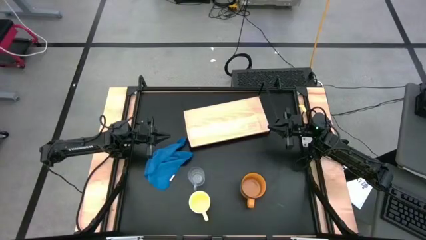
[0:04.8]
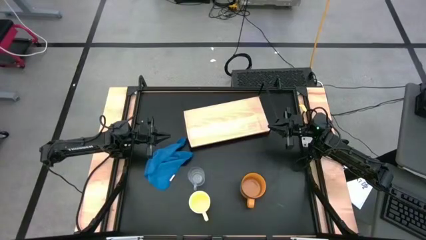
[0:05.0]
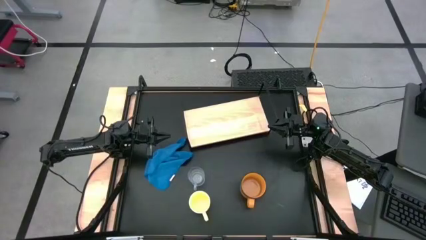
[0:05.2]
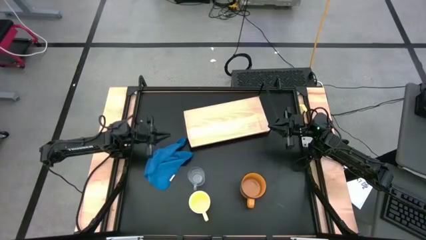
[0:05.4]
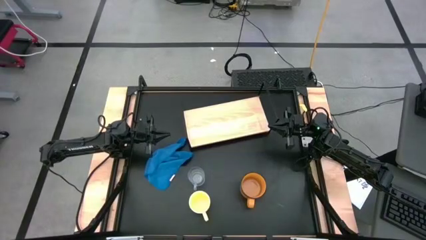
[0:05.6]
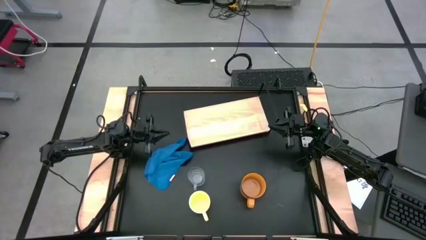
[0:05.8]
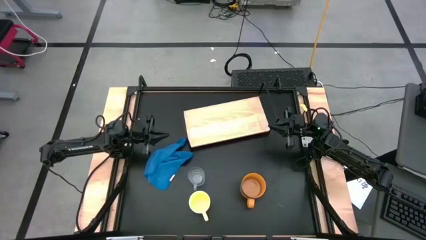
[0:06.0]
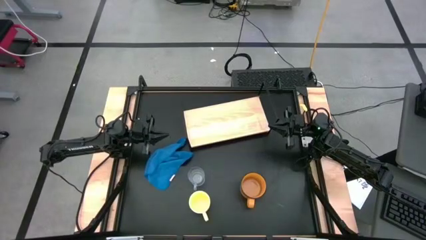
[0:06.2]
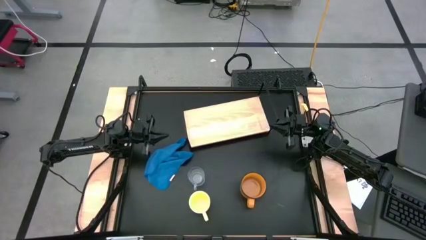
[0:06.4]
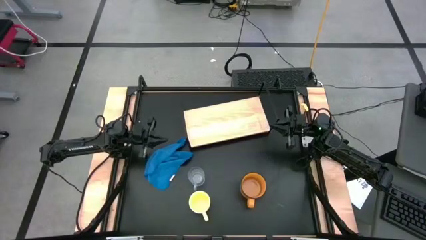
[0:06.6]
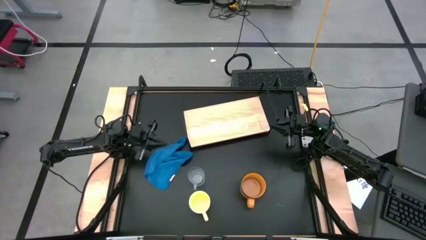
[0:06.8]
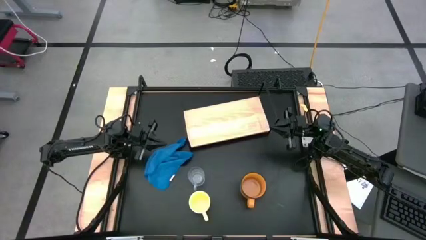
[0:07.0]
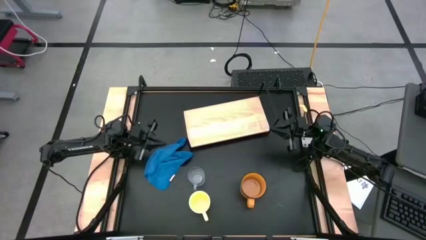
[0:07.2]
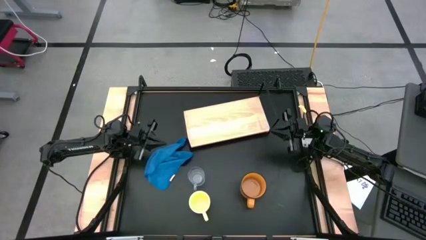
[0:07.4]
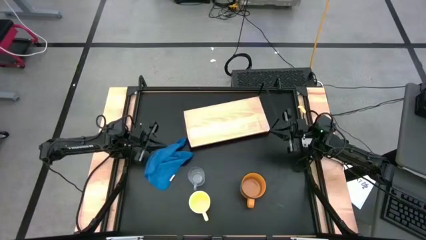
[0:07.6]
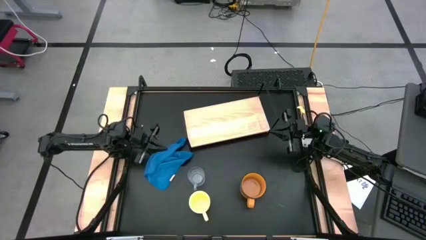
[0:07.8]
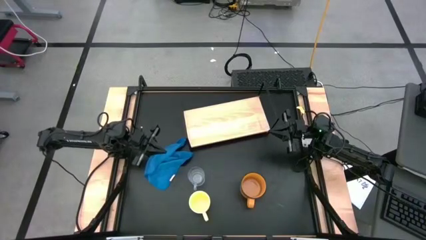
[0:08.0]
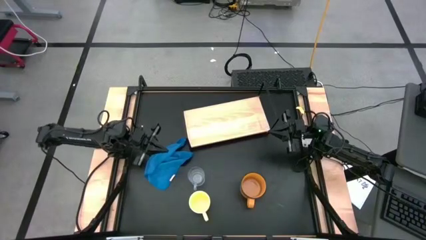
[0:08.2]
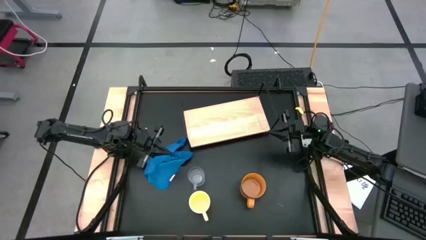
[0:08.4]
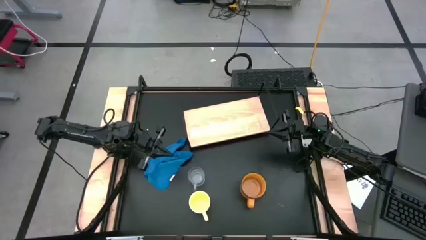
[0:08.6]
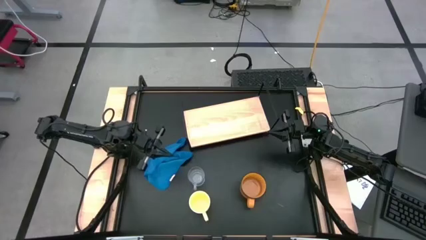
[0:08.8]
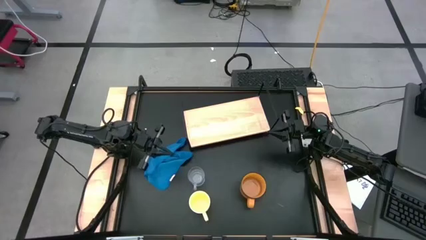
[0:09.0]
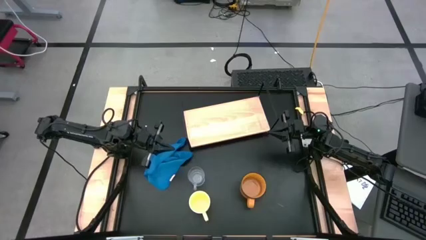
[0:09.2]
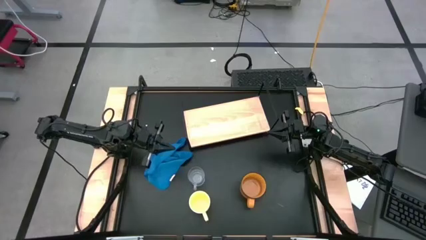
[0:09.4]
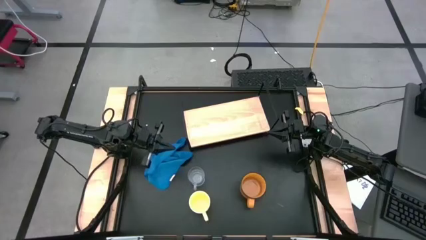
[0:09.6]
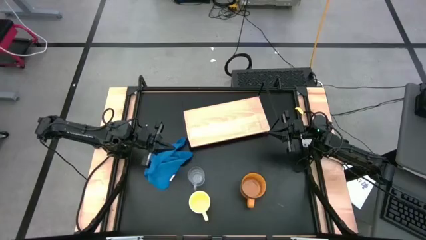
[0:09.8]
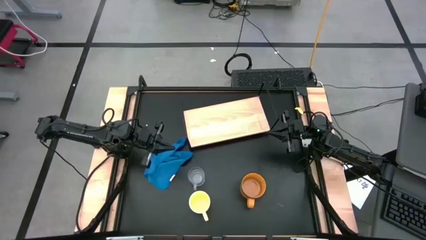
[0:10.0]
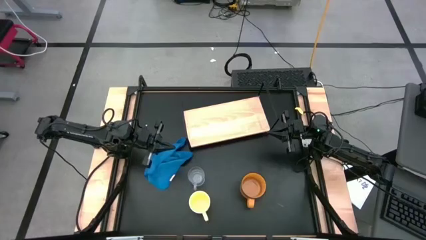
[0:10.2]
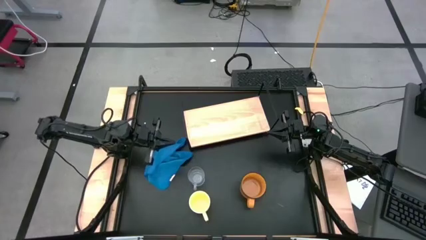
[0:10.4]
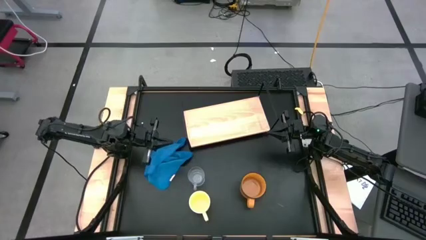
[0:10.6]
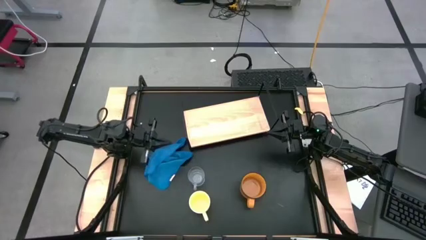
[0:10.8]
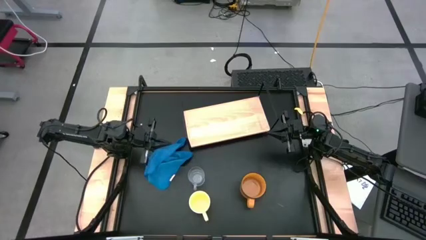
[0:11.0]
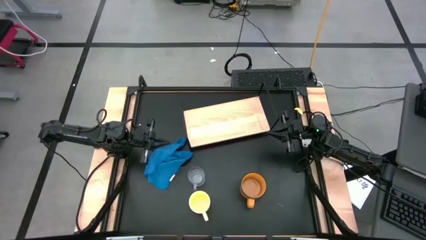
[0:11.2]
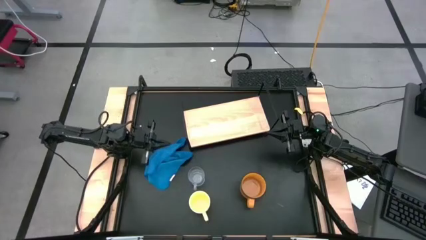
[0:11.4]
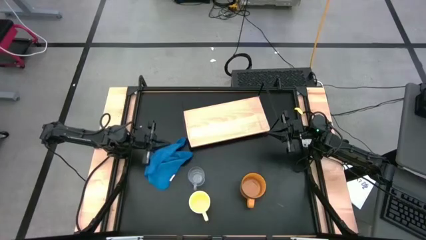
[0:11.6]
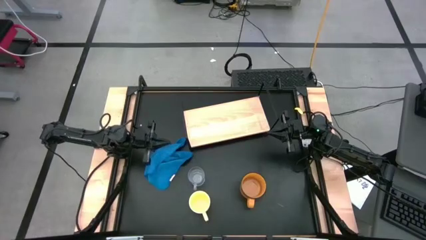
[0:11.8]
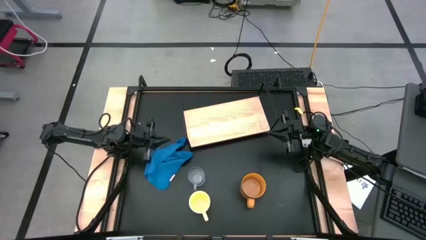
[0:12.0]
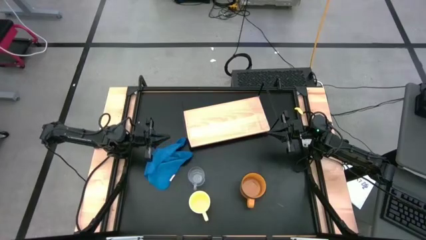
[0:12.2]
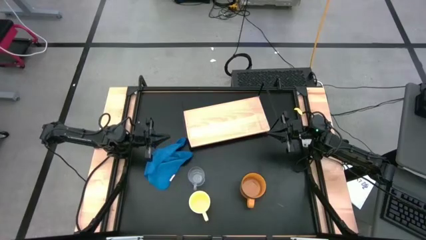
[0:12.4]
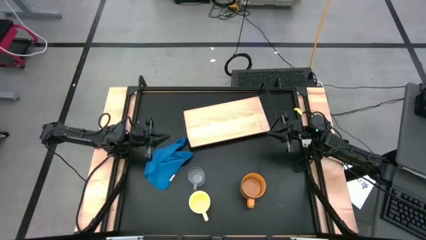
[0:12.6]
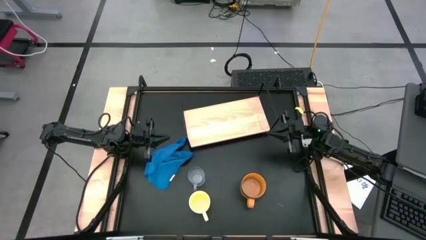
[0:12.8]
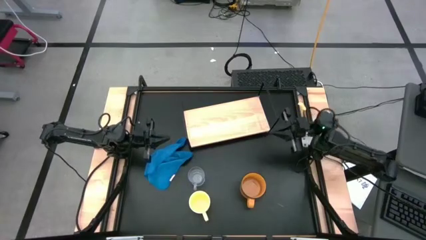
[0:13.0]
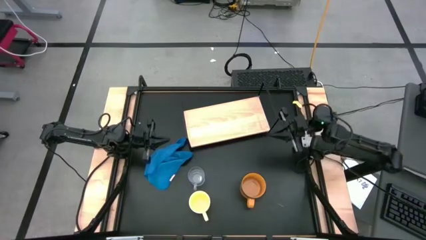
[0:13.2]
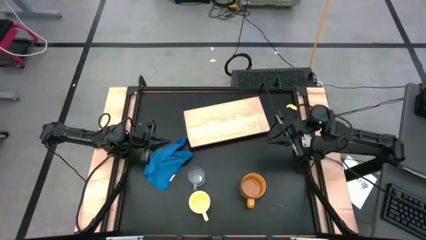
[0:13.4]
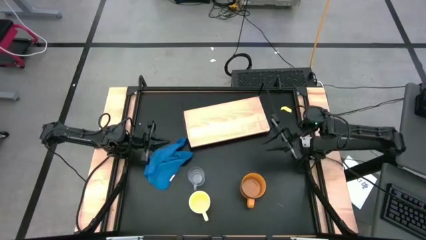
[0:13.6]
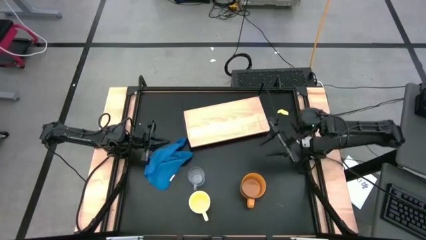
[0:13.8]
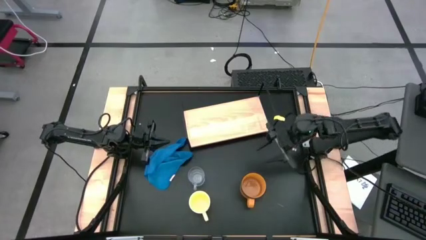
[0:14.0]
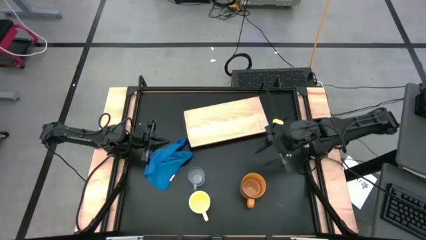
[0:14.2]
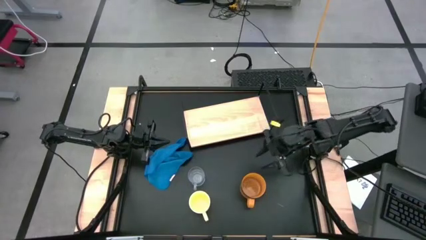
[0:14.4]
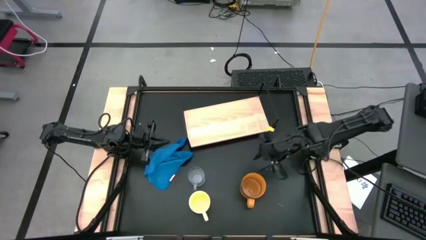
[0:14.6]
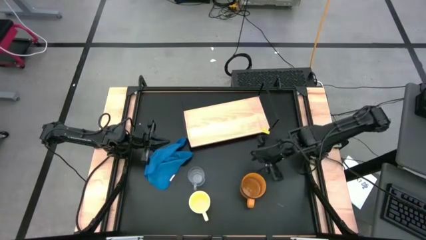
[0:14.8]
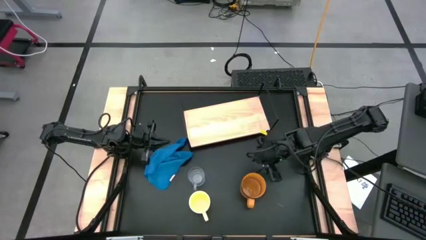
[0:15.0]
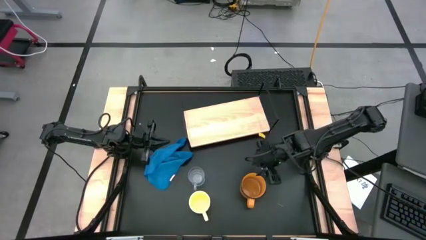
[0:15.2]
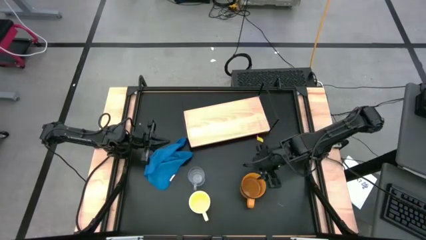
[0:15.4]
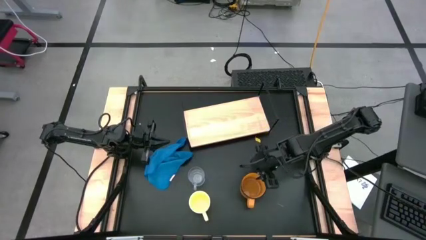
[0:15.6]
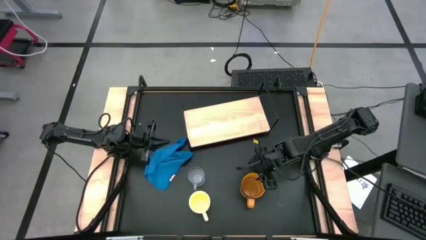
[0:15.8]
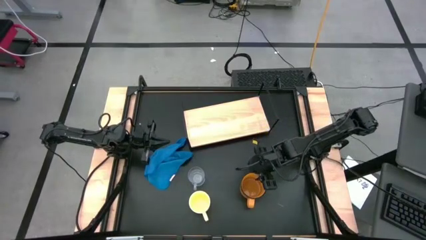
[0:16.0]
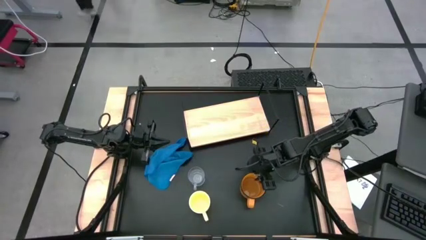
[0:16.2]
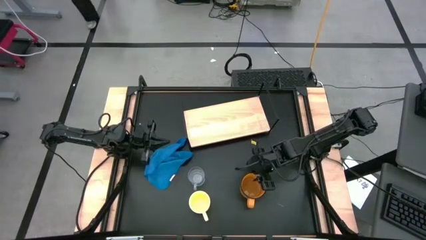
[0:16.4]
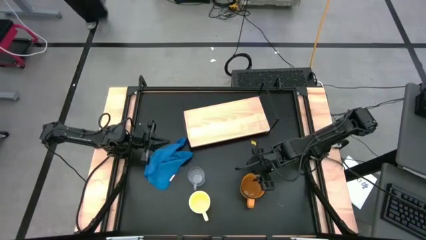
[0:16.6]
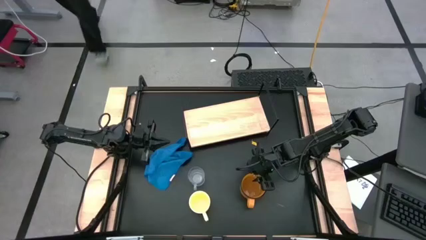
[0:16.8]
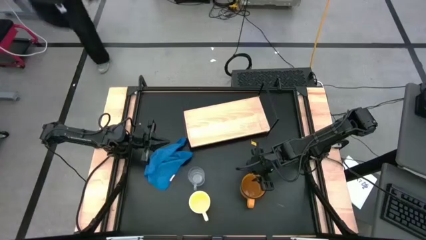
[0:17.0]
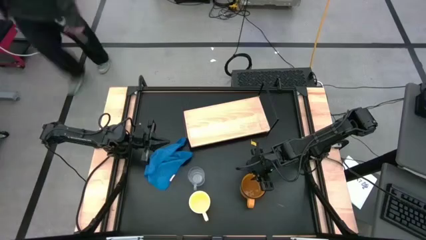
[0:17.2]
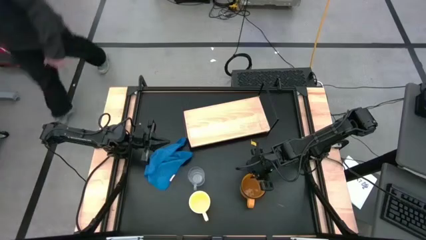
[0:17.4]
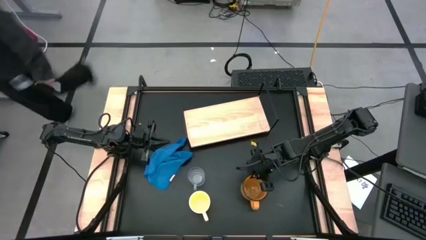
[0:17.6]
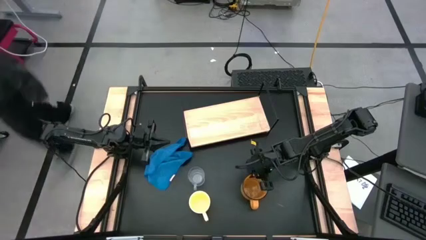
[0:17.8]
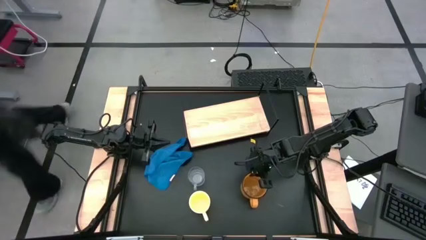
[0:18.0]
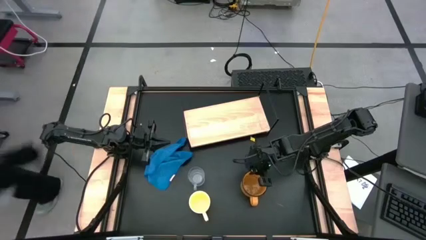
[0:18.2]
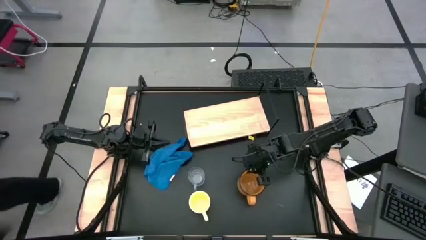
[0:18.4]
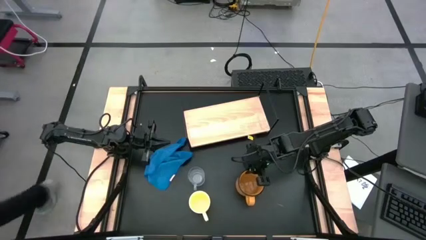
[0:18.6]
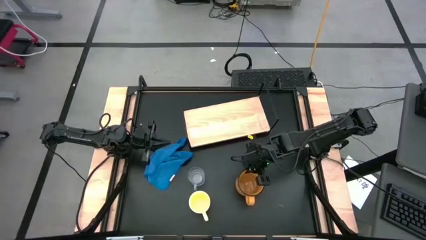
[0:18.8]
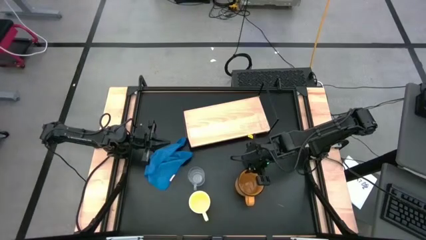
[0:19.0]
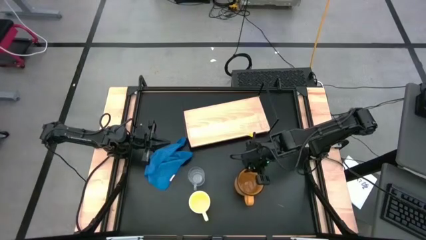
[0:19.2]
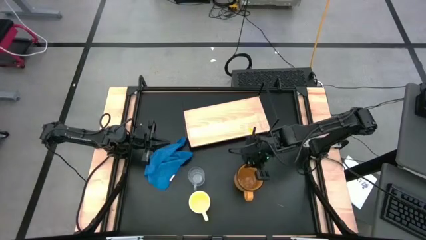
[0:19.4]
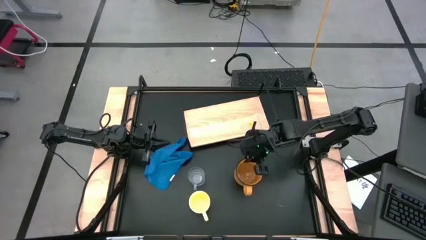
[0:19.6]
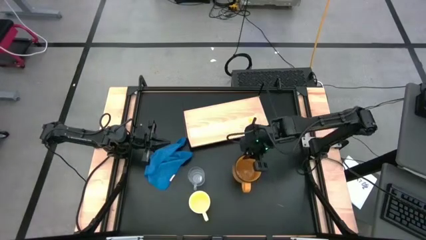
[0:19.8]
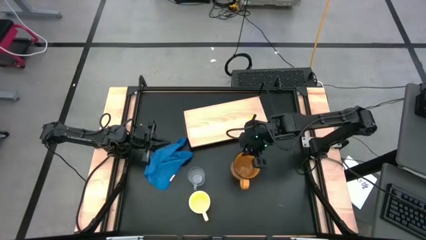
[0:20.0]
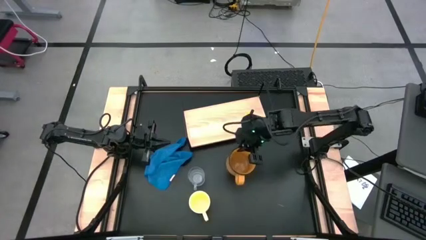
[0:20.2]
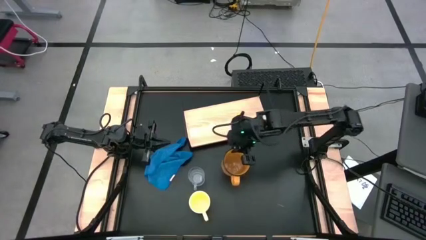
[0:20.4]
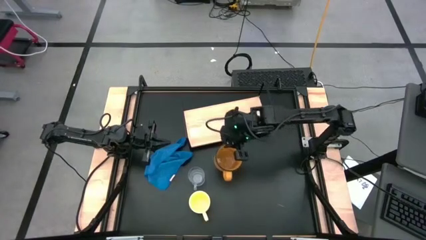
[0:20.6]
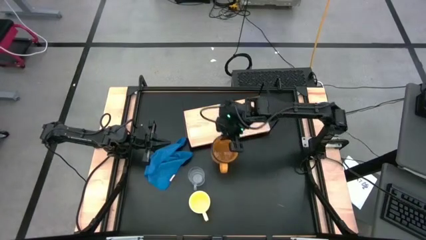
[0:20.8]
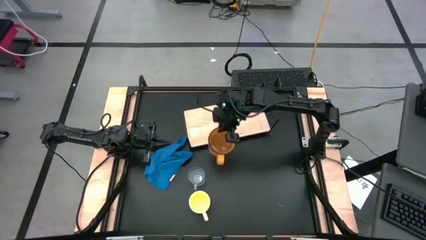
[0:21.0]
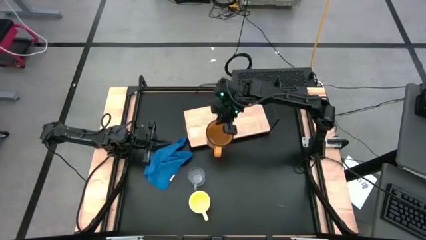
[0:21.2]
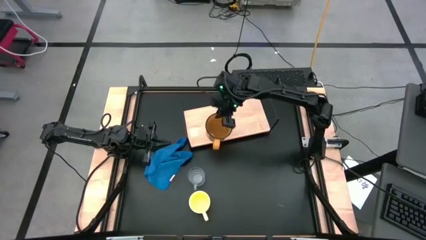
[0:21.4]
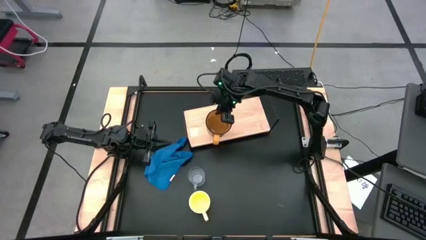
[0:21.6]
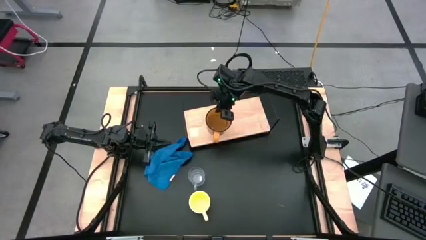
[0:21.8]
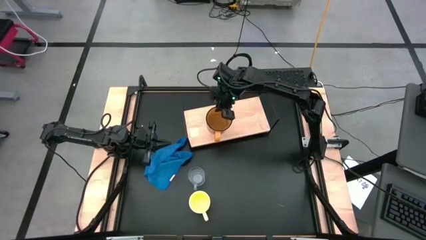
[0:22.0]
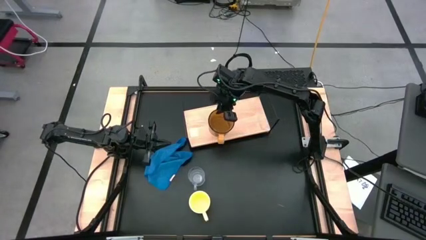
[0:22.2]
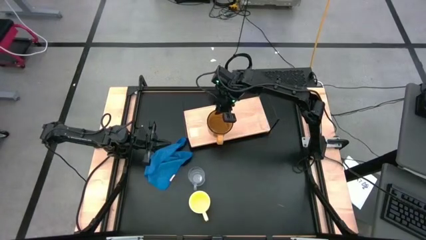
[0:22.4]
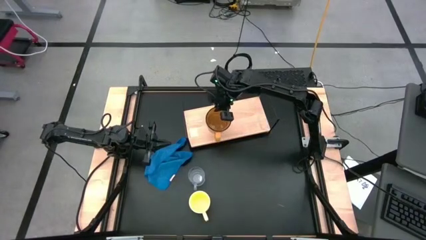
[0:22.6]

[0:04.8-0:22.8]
Task: Stack small to large cups/mugs on shelf
Put the brown mug on the shelf
